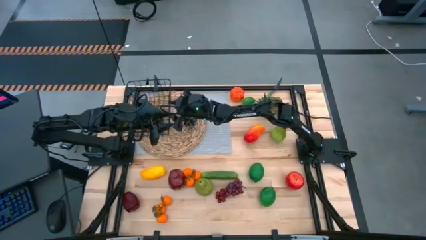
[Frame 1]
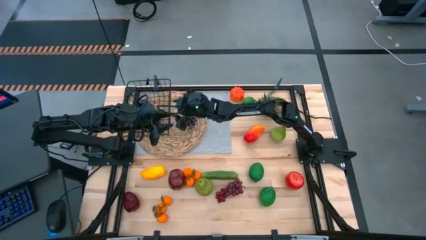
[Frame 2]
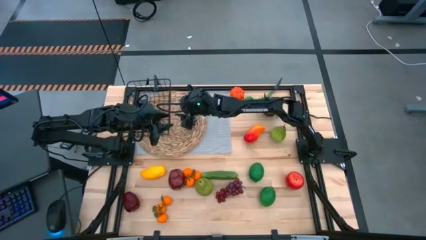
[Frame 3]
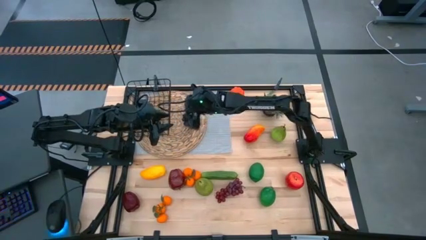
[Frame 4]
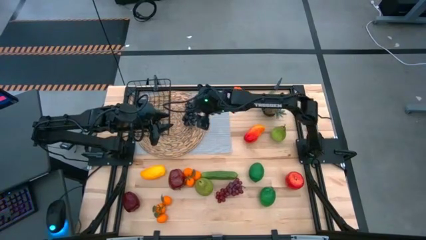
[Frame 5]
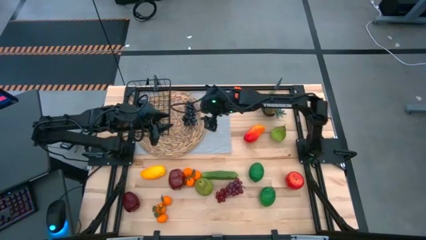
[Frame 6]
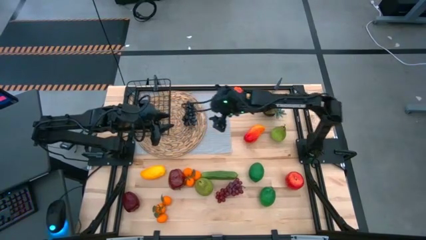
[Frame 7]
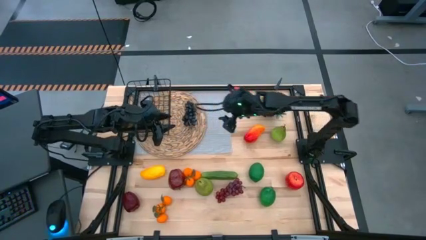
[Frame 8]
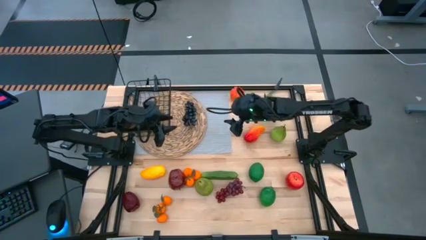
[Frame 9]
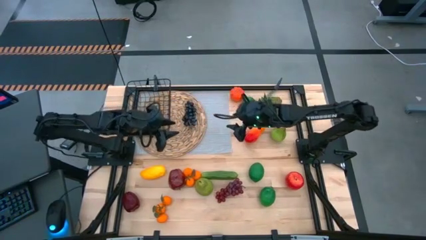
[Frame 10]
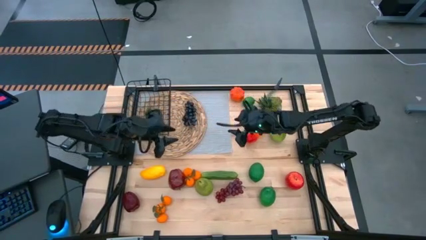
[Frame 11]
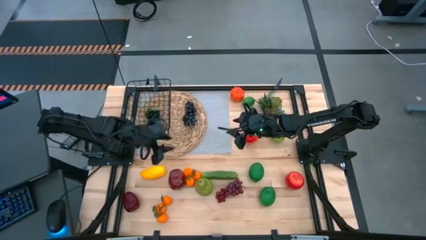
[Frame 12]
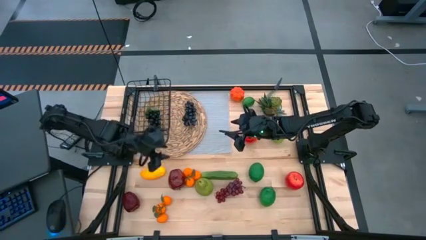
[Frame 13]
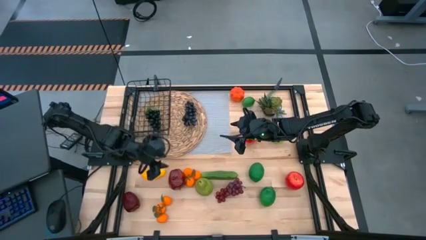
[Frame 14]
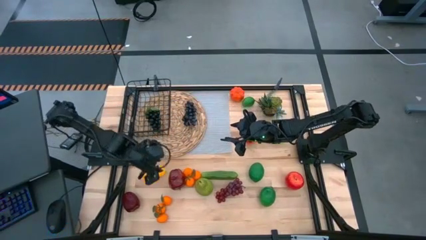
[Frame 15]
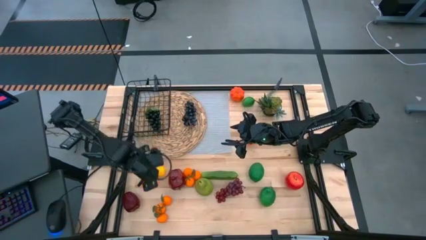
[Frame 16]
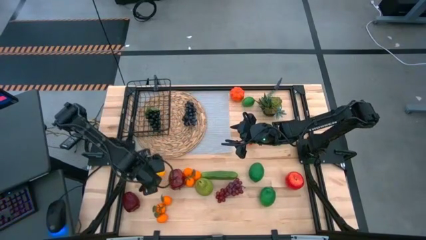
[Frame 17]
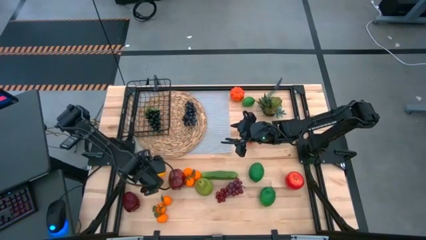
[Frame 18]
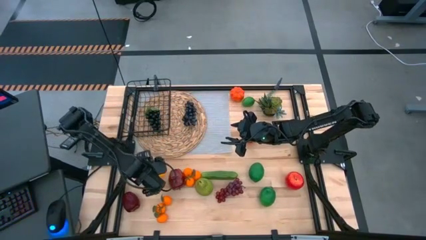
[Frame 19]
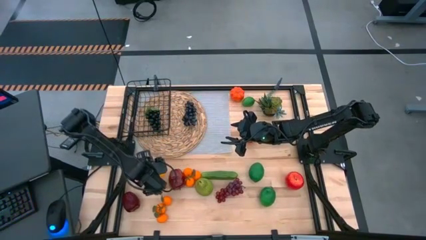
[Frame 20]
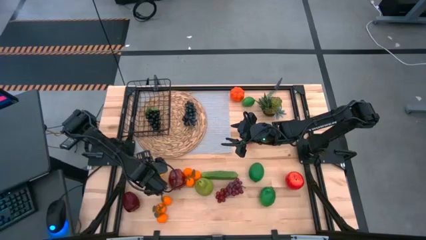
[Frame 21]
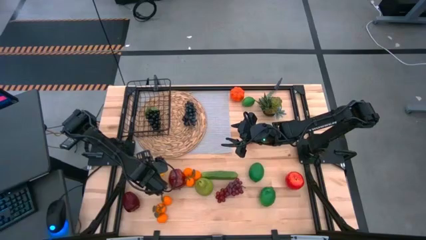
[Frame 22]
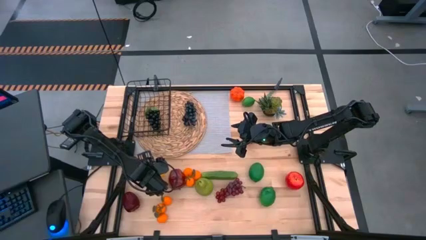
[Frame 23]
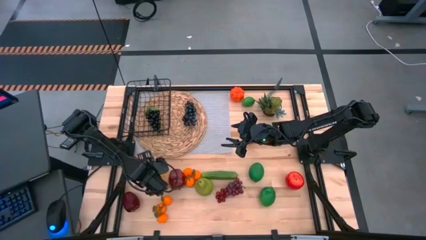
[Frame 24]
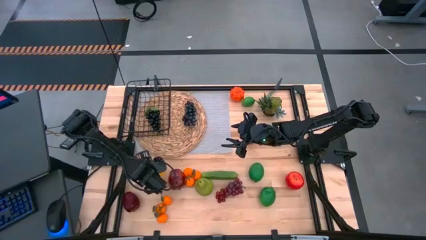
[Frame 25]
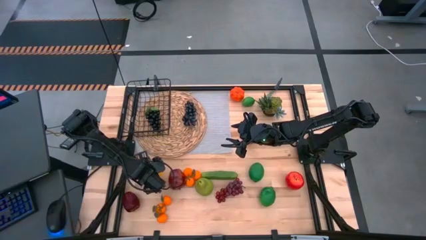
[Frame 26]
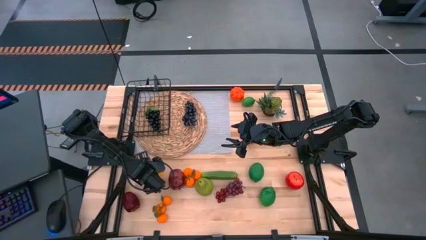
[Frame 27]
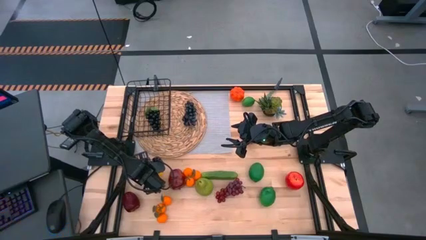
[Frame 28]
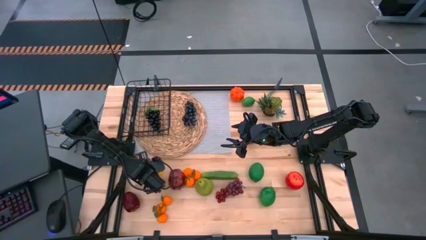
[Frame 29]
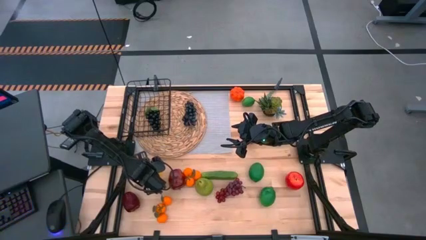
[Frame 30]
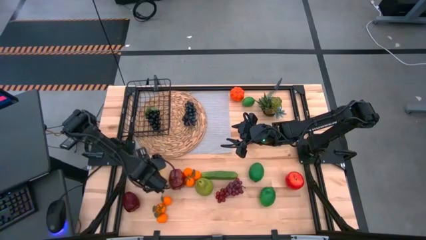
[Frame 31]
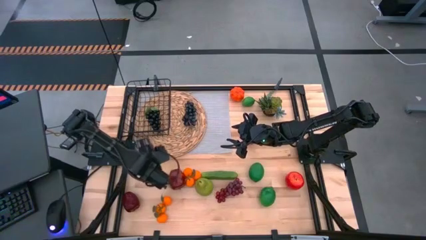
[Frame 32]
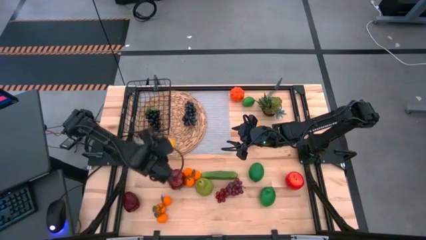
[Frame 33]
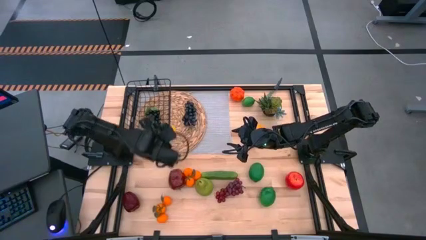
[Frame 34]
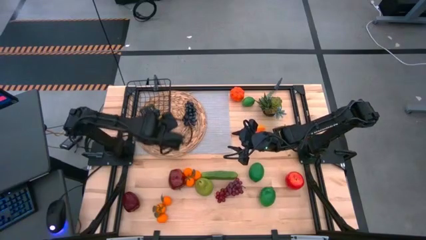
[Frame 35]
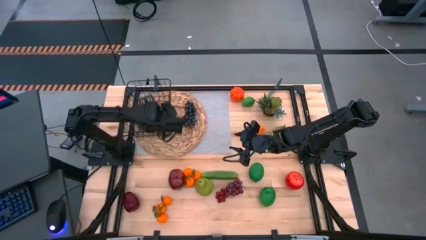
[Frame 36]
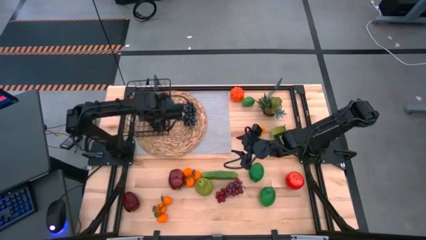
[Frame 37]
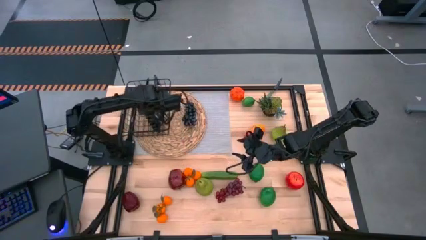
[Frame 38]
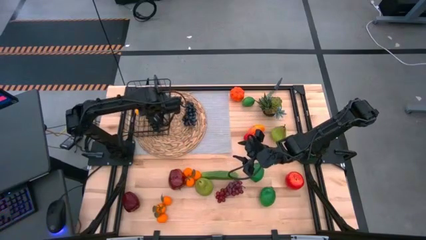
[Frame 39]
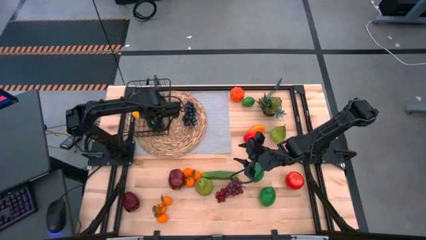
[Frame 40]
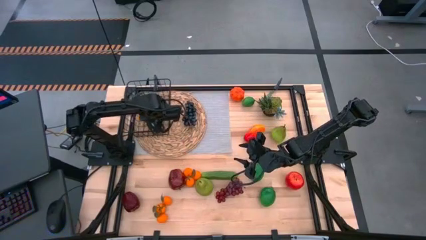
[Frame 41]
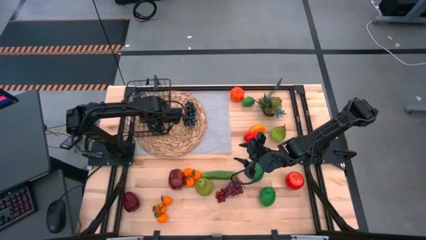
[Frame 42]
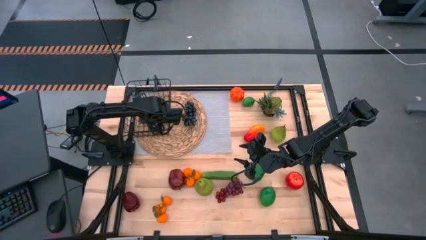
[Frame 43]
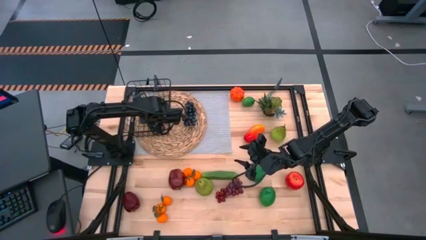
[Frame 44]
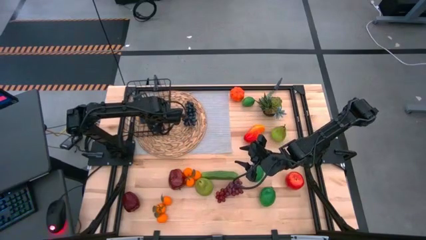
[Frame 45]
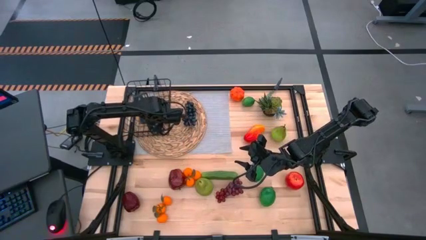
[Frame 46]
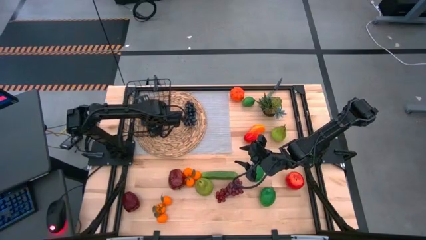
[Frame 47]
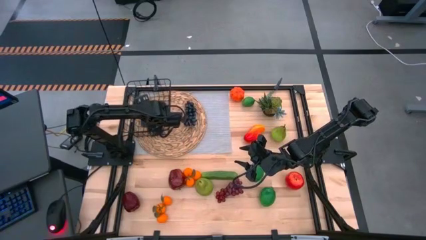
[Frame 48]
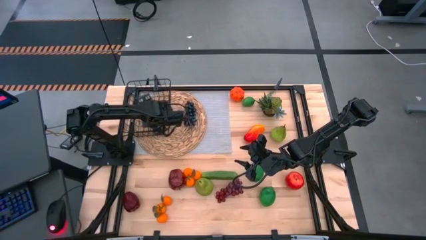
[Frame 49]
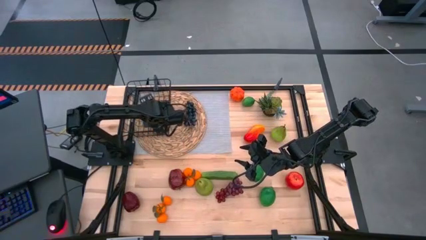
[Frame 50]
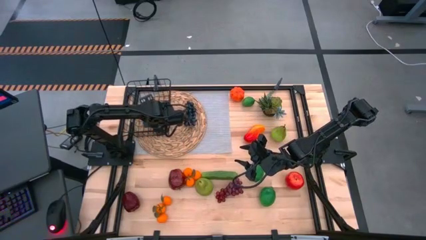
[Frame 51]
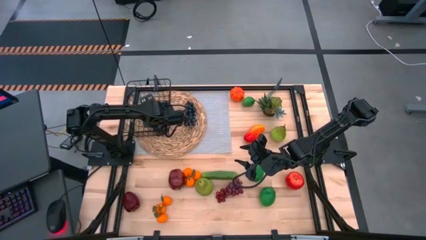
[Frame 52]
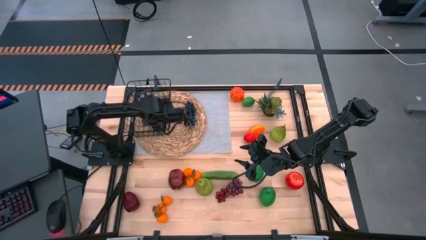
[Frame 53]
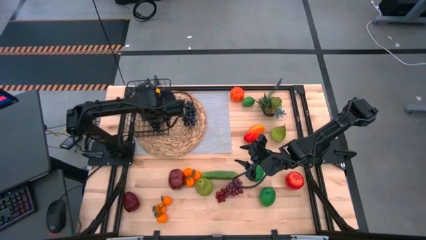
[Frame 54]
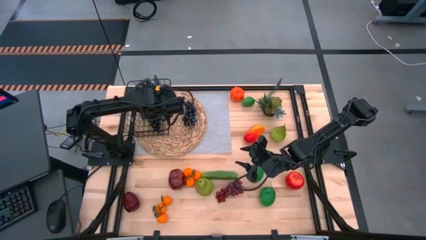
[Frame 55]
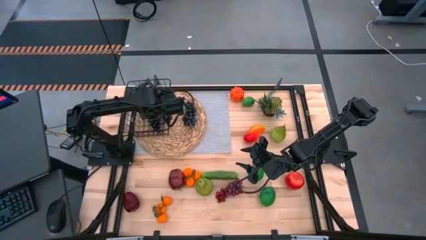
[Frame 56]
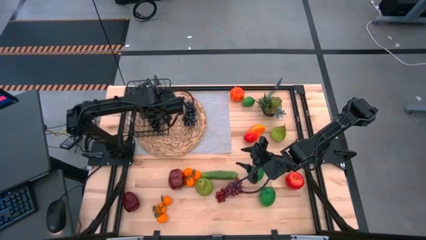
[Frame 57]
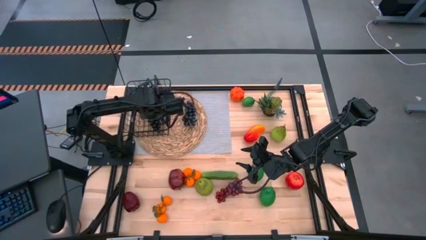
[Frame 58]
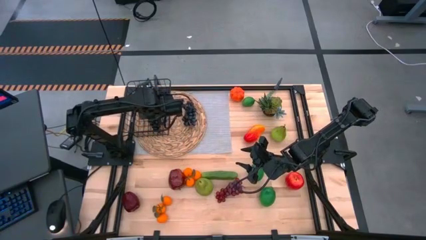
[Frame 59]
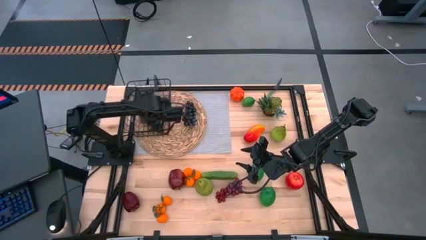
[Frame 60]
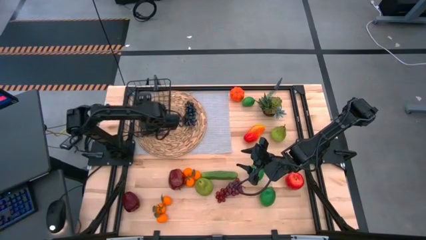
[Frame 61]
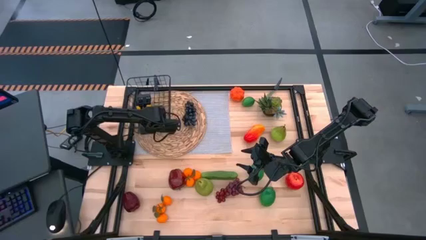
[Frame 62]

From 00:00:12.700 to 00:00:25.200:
Task: Build produce basket
Put the yellow mango into the wire basket
